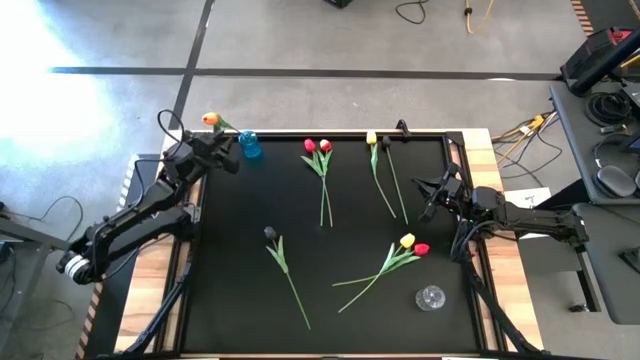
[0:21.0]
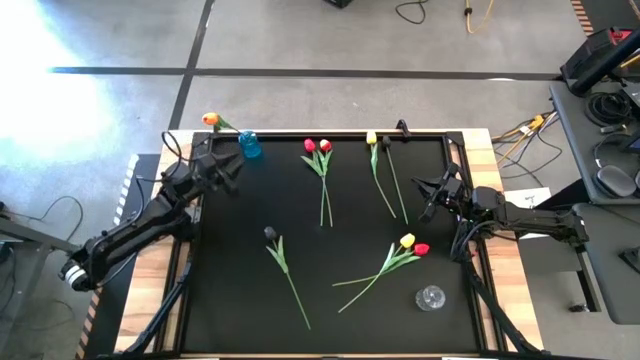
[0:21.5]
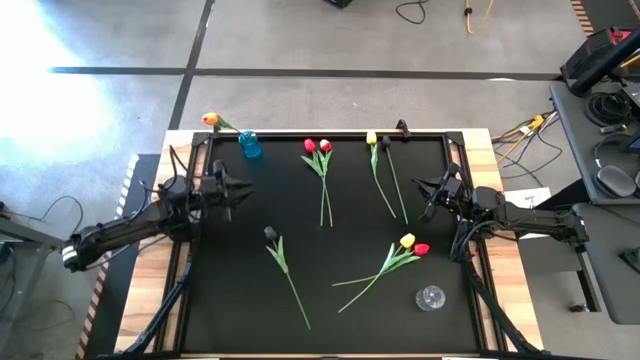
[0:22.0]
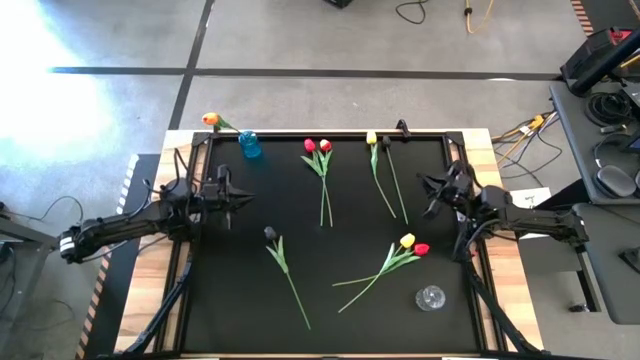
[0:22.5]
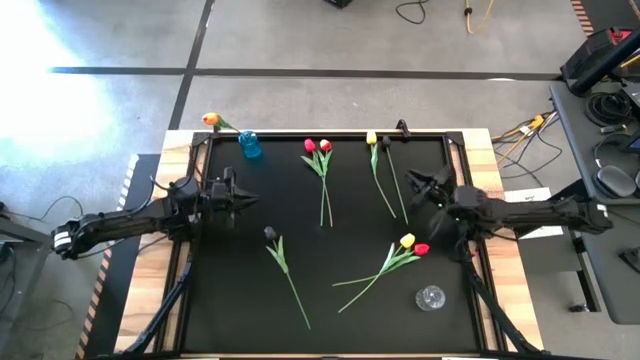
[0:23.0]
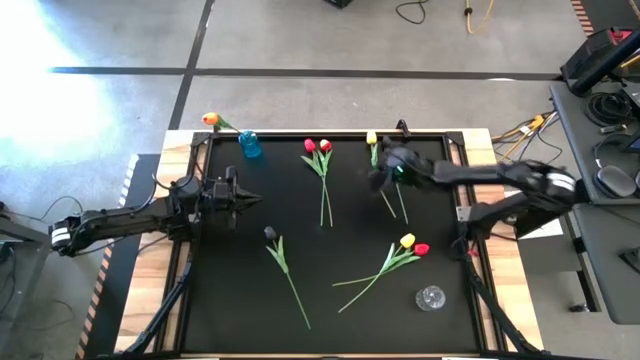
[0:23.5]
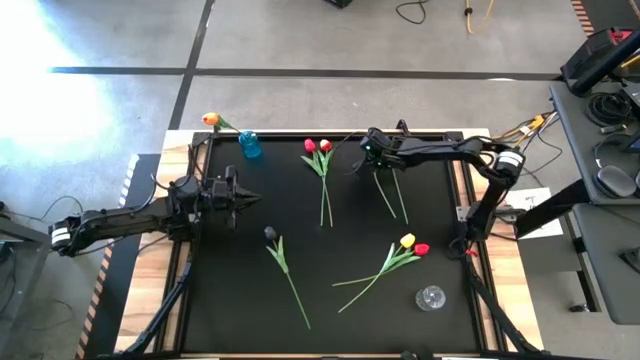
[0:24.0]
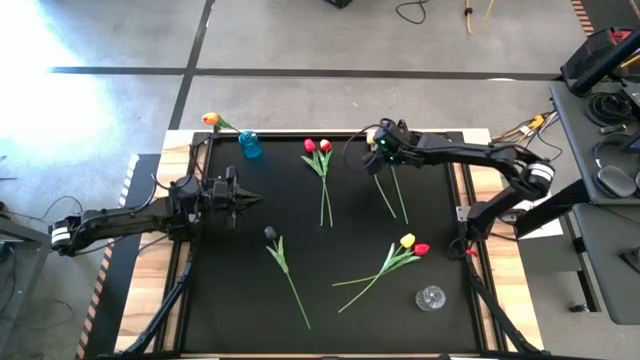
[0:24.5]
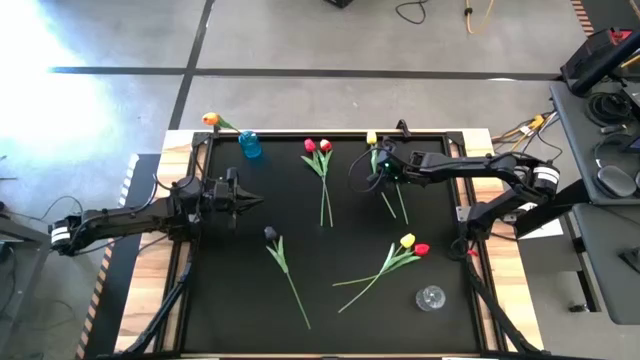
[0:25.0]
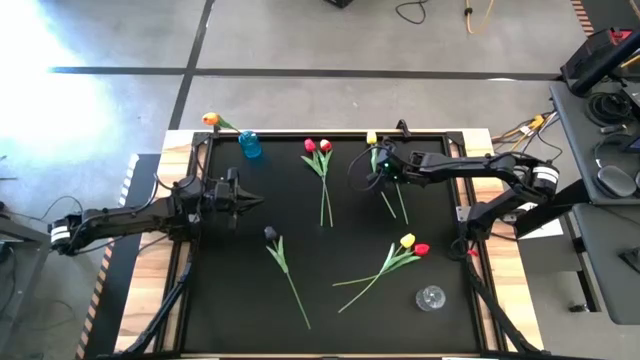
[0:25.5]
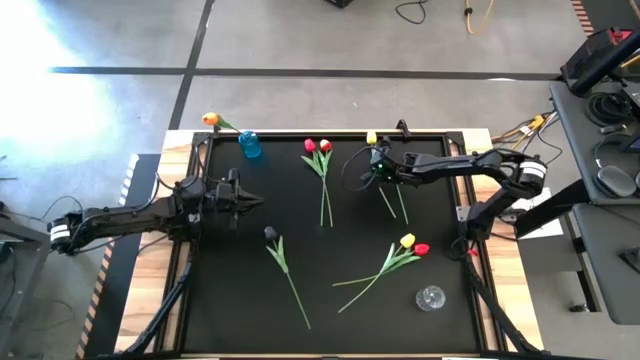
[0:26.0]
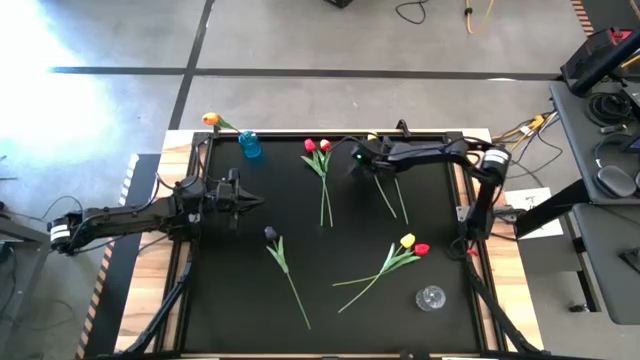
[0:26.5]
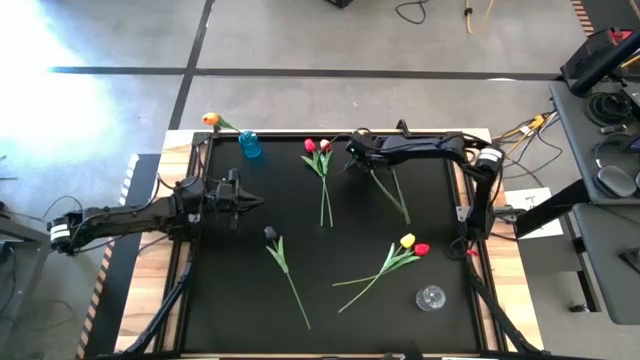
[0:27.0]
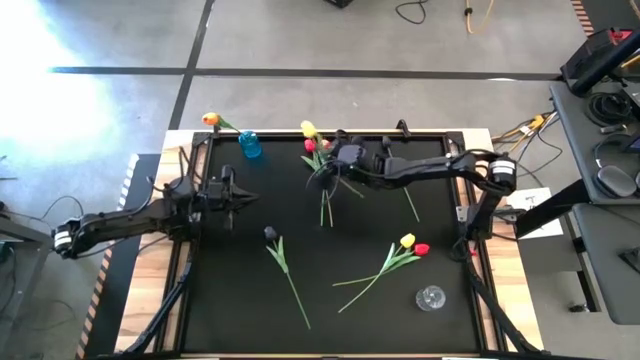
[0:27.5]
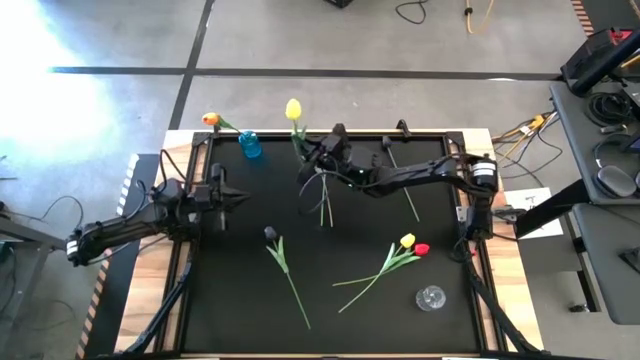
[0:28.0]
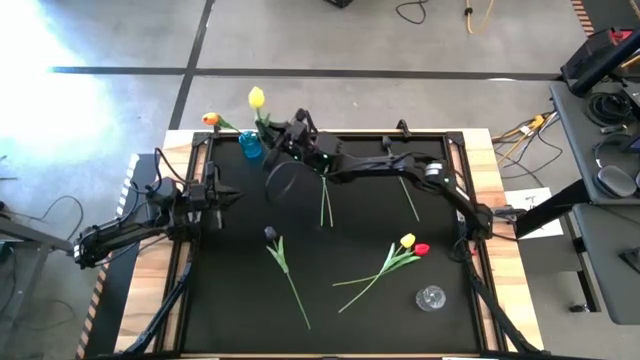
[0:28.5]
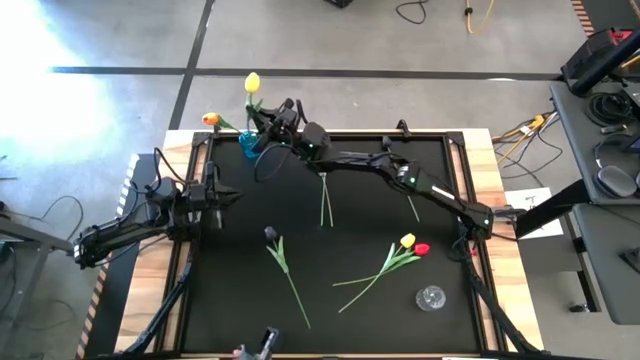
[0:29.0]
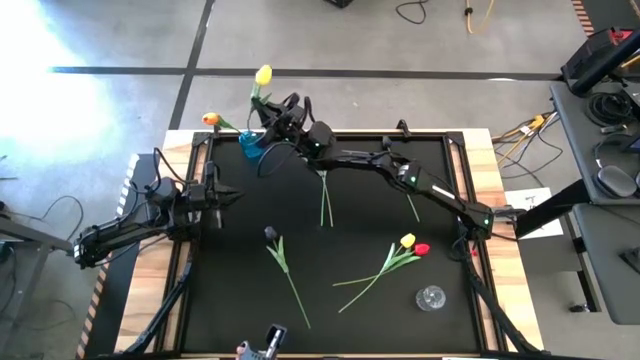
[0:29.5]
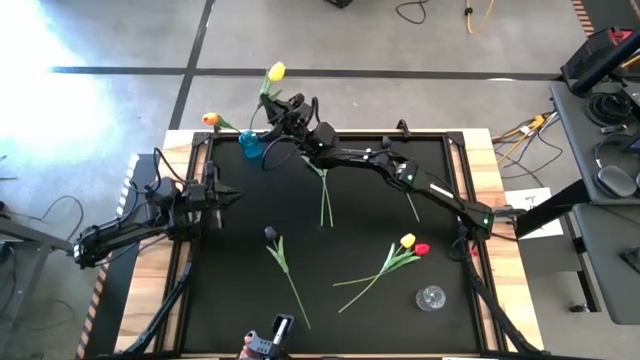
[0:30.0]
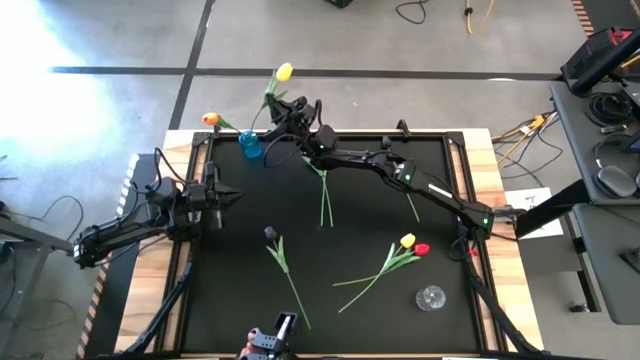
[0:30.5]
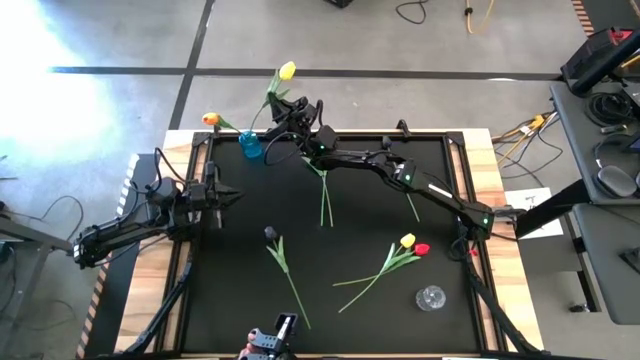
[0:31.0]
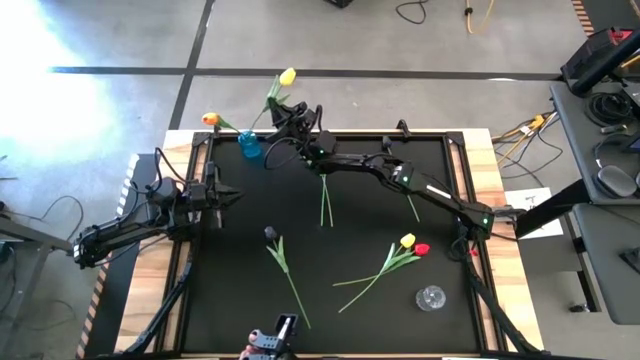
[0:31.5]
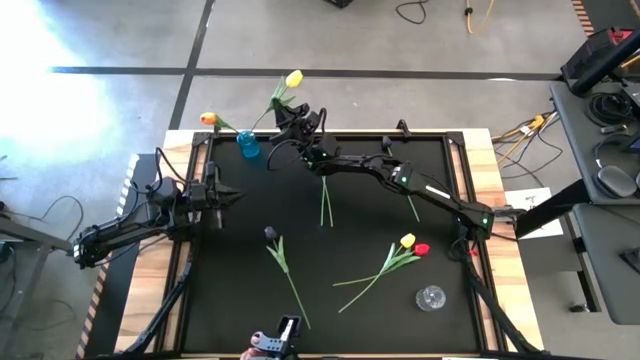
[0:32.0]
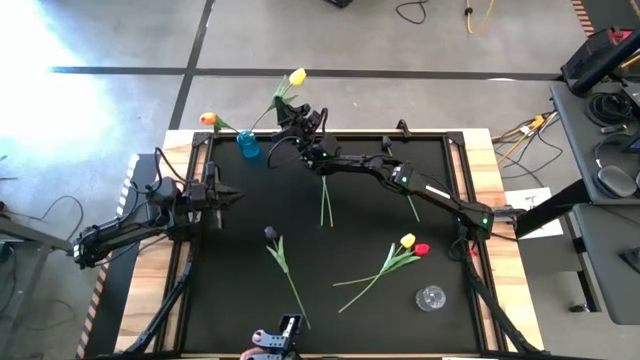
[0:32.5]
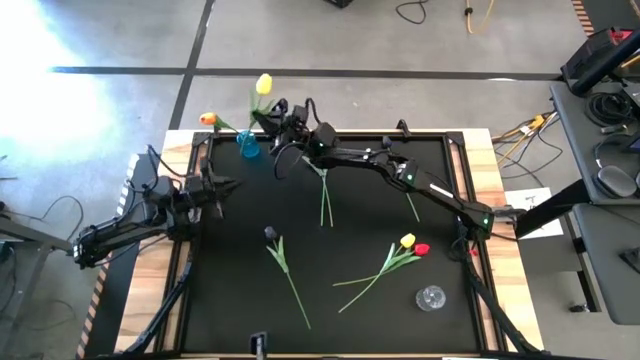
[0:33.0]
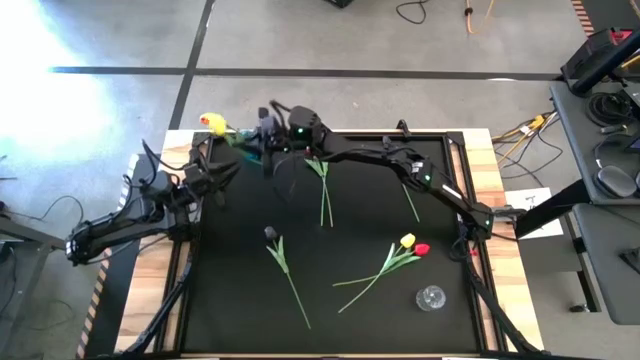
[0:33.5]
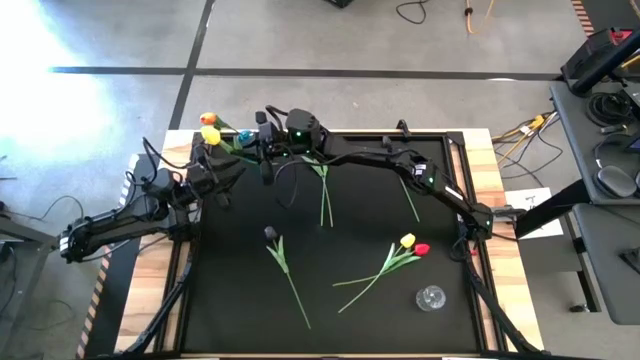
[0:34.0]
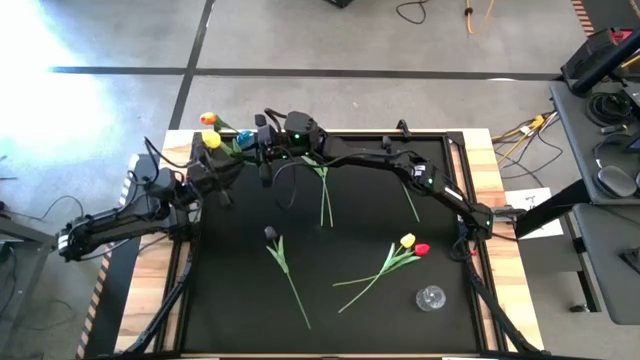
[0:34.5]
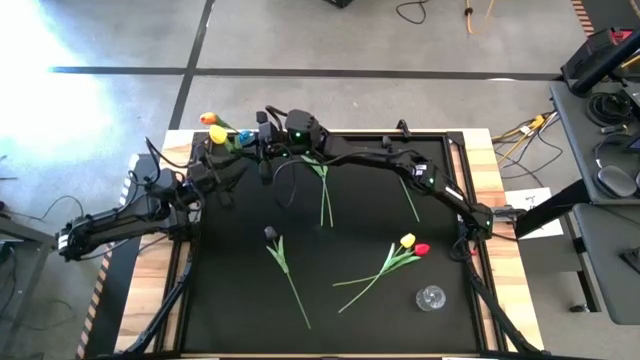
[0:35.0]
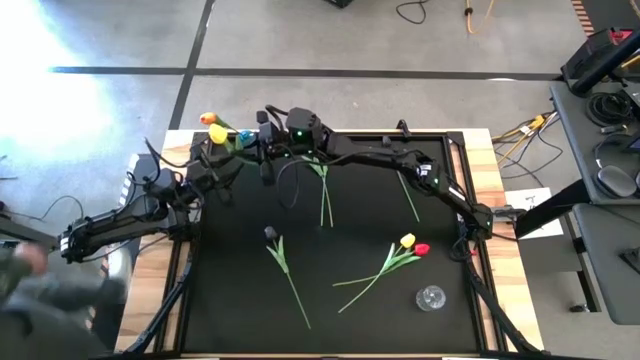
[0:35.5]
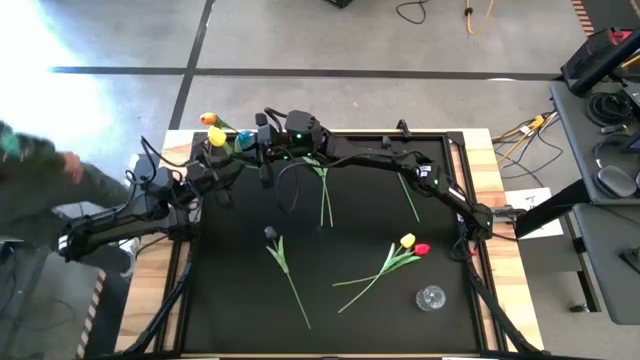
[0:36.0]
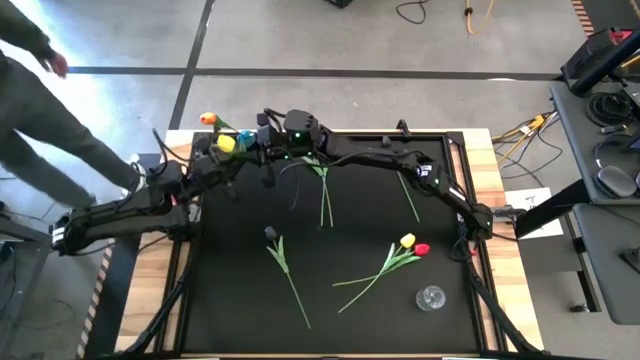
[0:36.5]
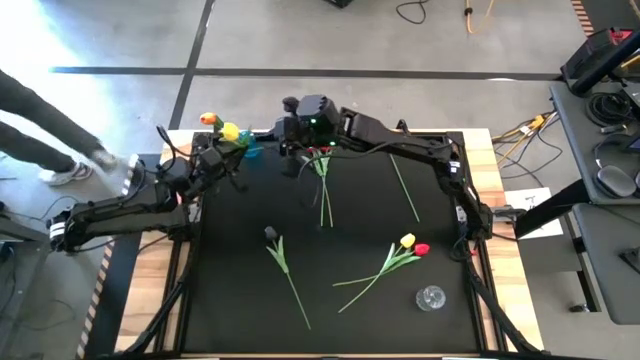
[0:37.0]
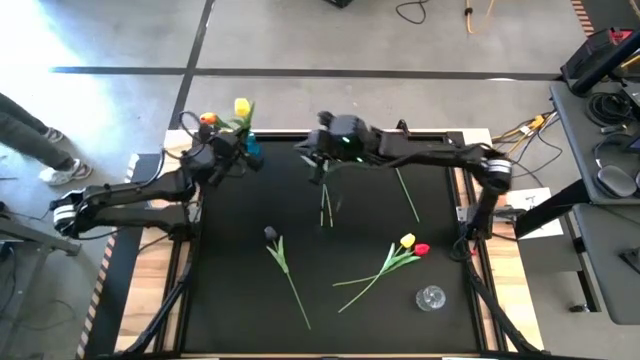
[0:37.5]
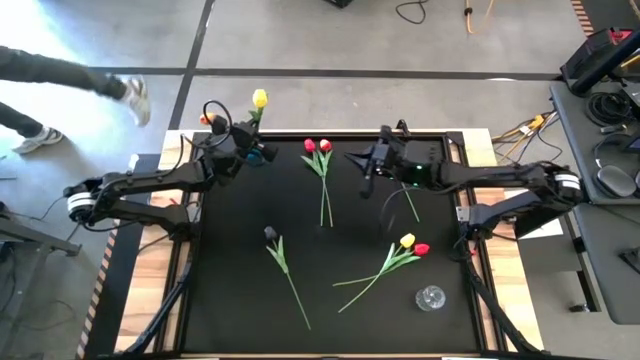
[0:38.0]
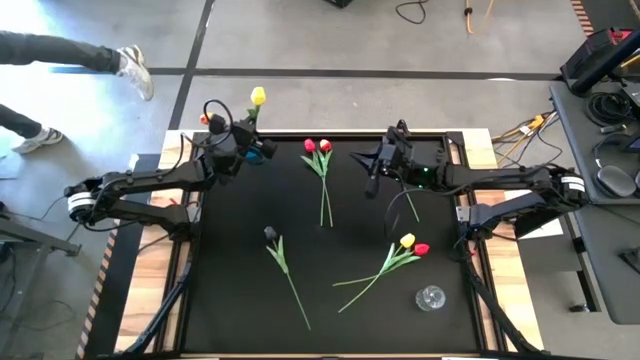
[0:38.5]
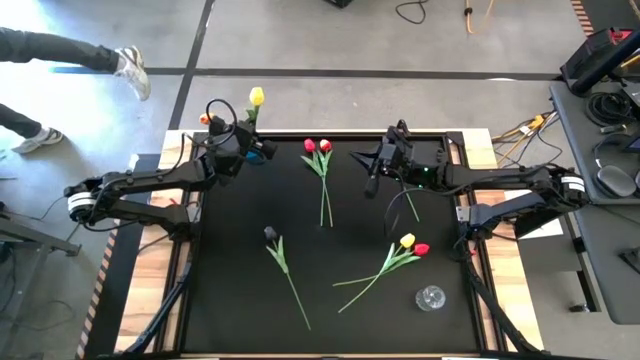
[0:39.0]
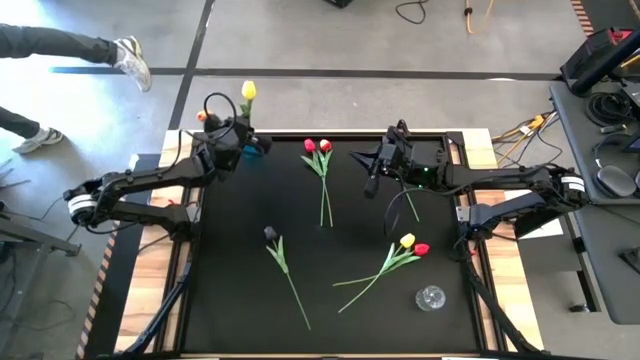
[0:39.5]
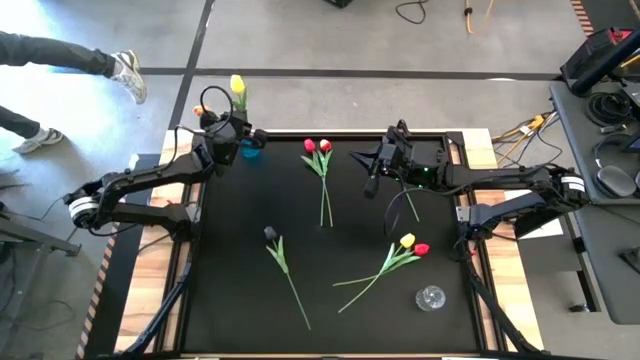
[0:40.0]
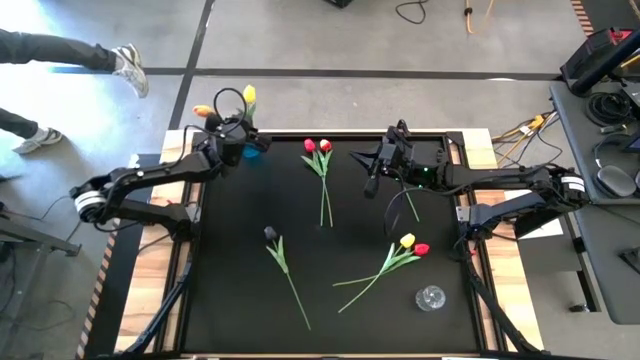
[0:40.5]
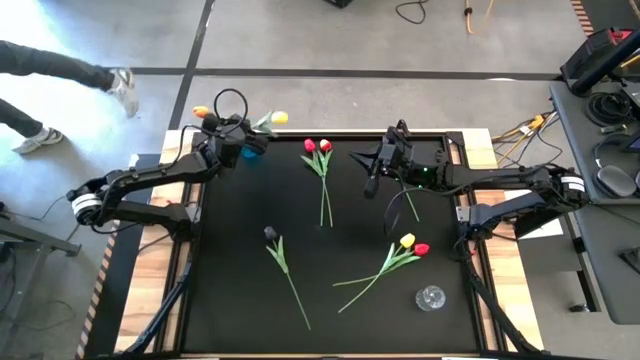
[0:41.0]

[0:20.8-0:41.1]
Task: Sort flowers into vase by color
Put the top yellow flower into the blue vase
